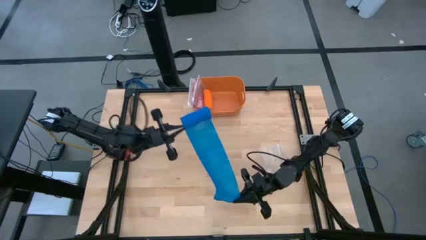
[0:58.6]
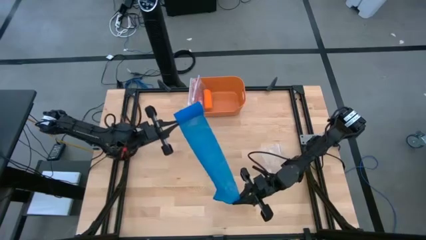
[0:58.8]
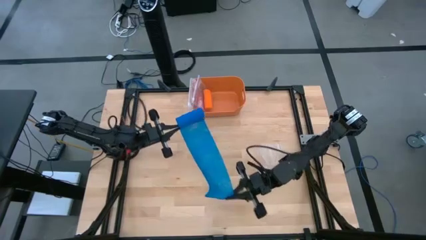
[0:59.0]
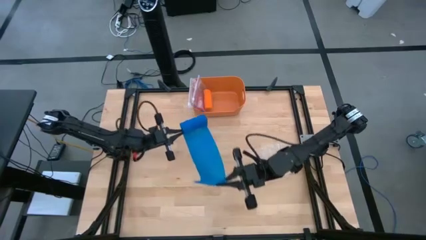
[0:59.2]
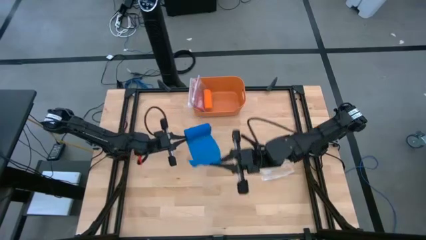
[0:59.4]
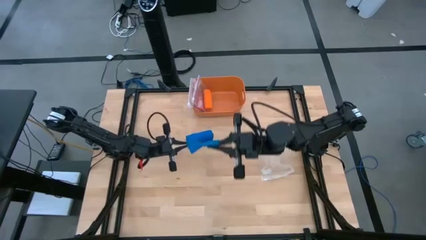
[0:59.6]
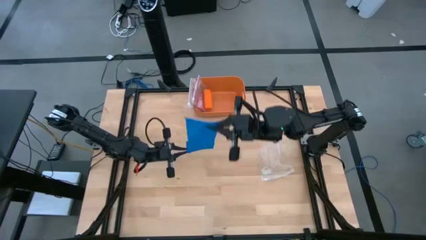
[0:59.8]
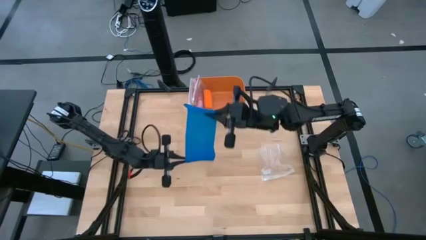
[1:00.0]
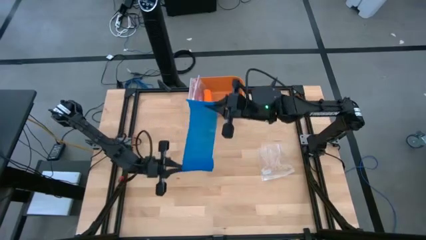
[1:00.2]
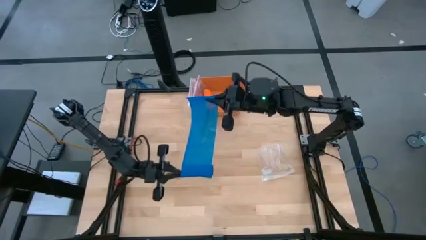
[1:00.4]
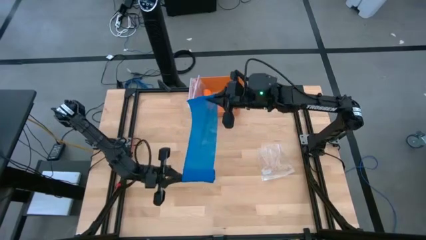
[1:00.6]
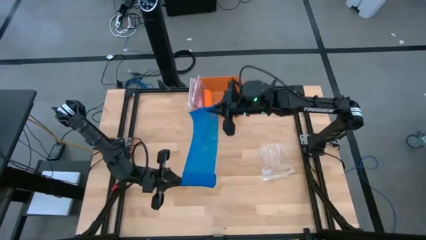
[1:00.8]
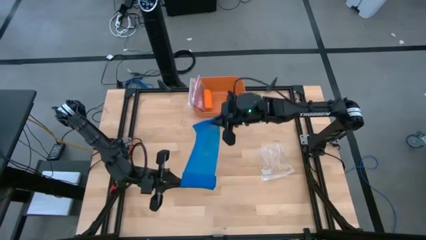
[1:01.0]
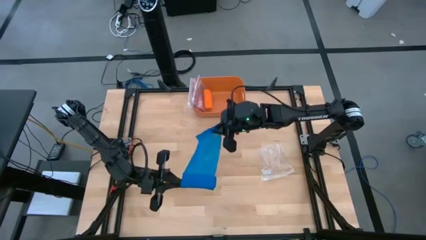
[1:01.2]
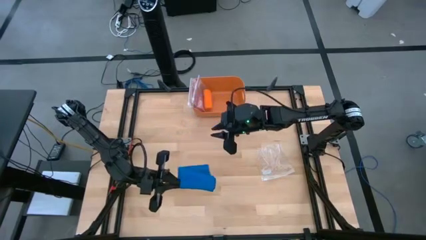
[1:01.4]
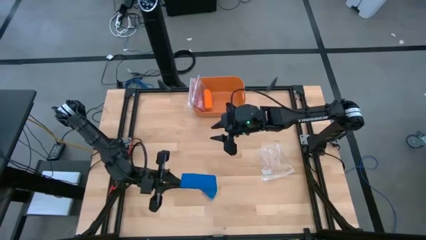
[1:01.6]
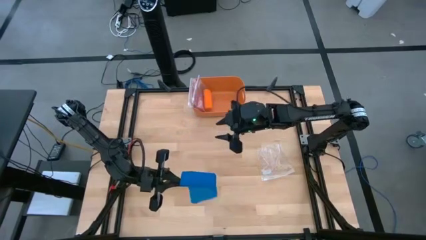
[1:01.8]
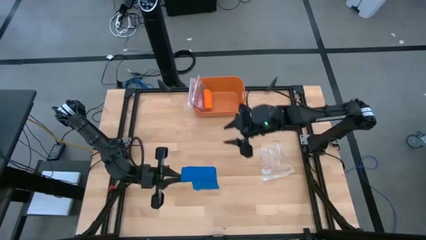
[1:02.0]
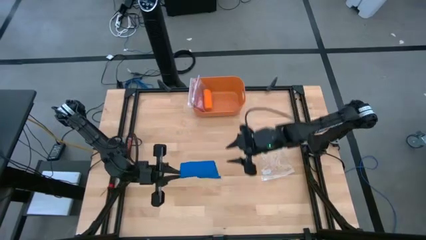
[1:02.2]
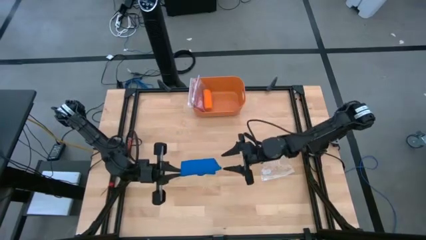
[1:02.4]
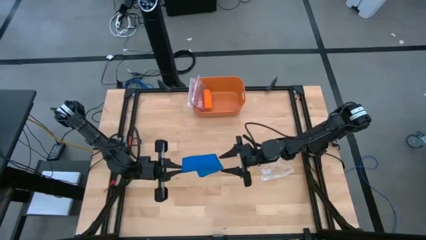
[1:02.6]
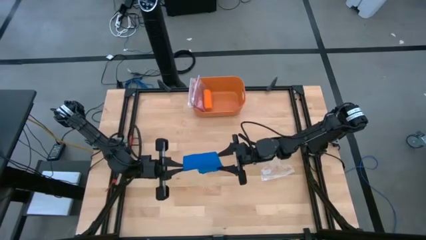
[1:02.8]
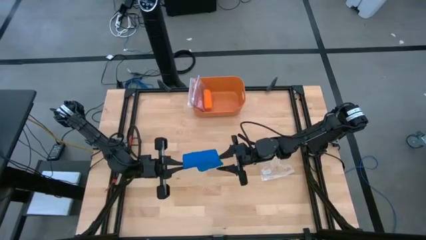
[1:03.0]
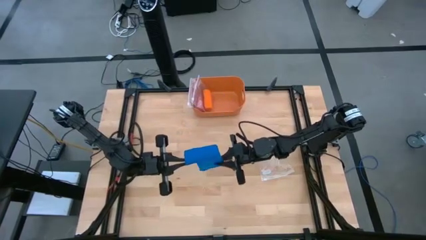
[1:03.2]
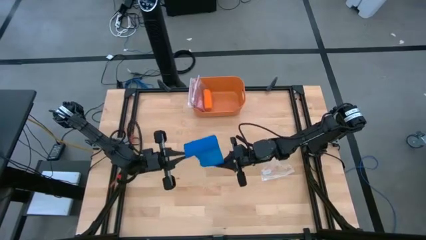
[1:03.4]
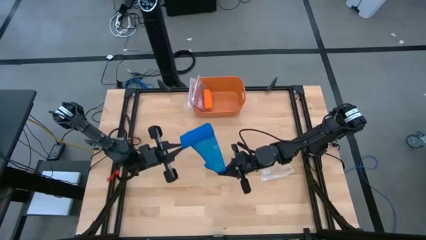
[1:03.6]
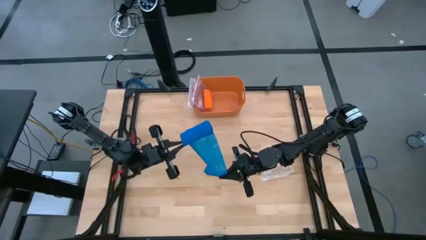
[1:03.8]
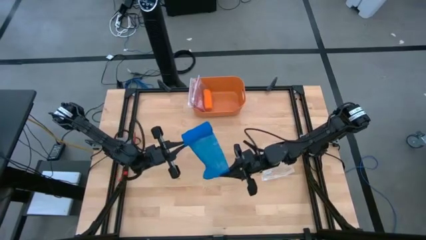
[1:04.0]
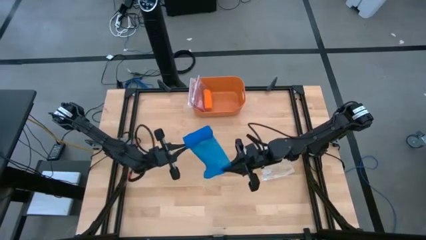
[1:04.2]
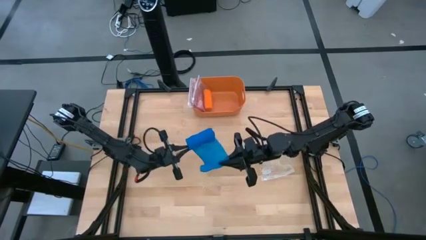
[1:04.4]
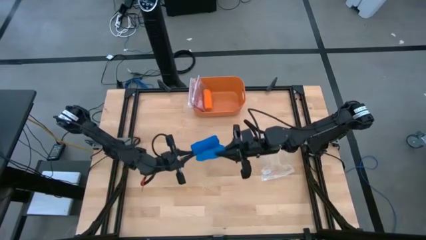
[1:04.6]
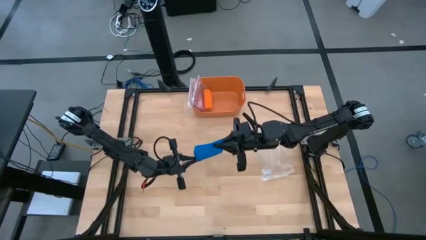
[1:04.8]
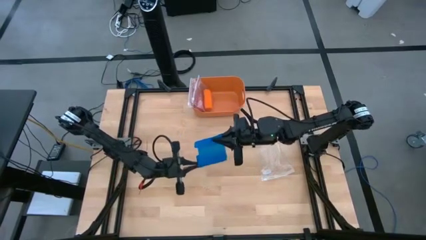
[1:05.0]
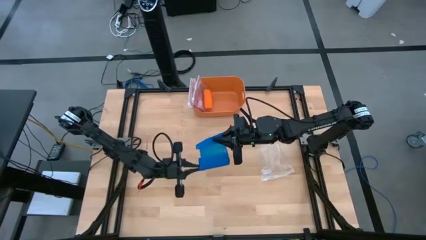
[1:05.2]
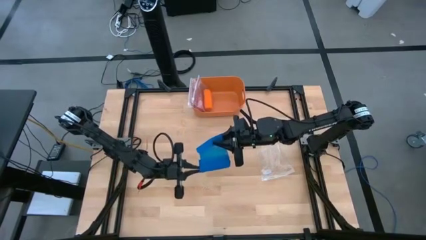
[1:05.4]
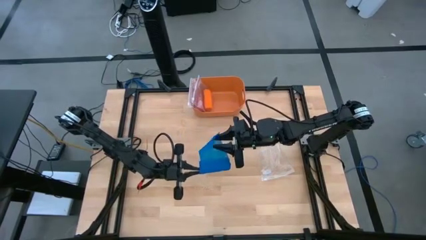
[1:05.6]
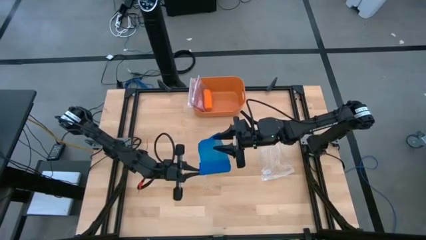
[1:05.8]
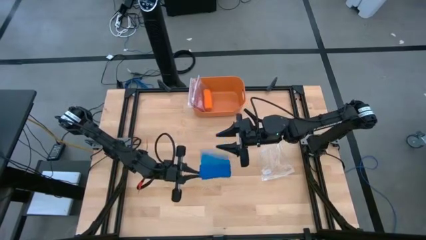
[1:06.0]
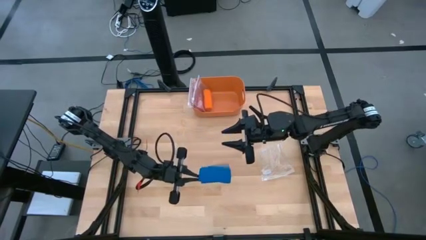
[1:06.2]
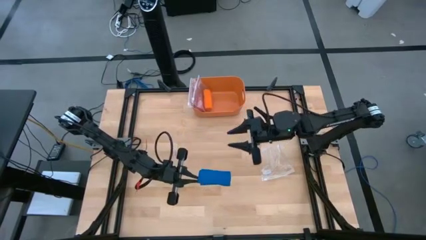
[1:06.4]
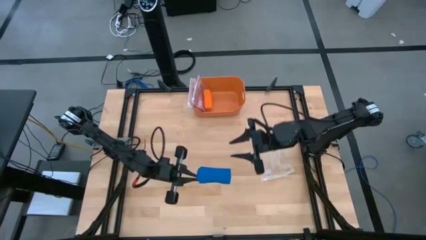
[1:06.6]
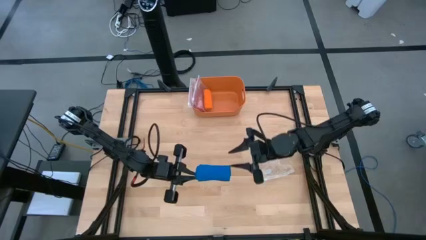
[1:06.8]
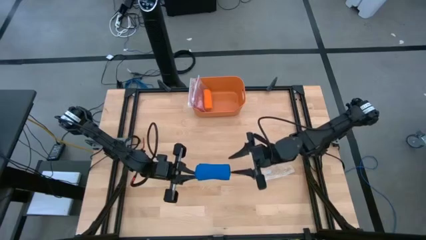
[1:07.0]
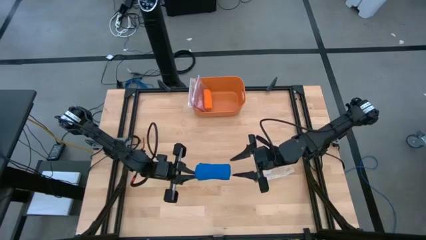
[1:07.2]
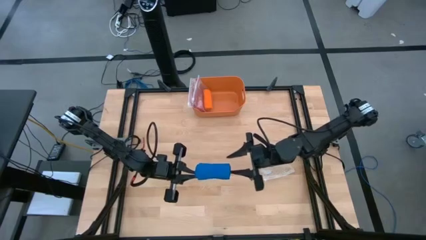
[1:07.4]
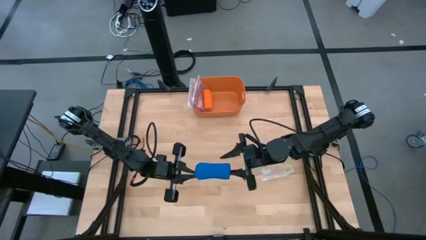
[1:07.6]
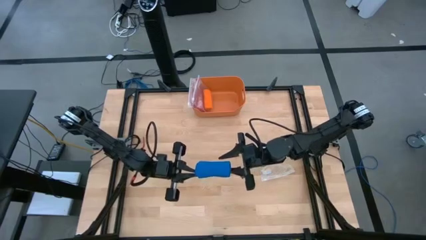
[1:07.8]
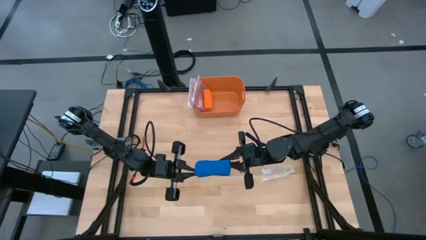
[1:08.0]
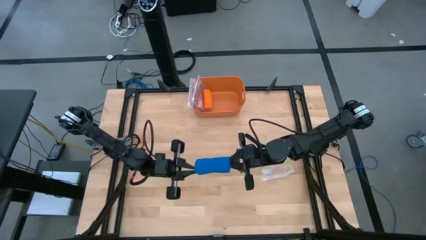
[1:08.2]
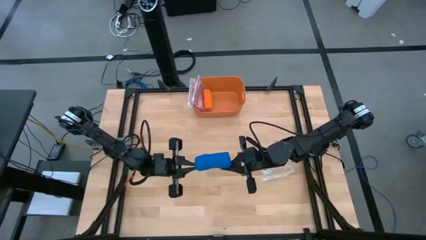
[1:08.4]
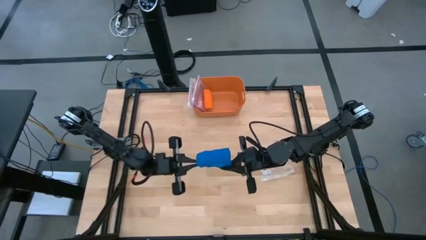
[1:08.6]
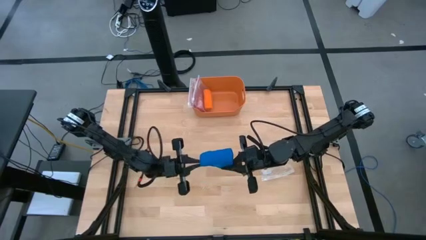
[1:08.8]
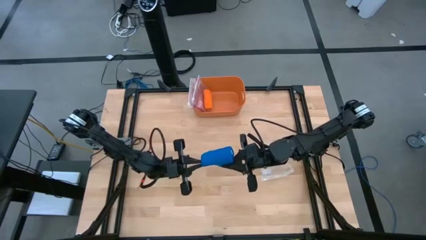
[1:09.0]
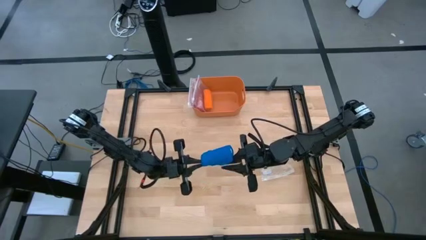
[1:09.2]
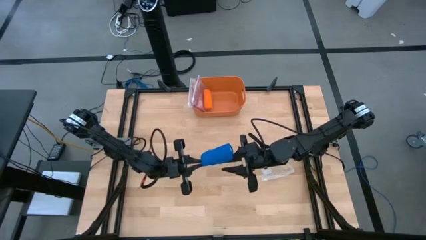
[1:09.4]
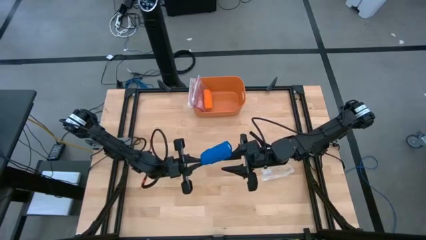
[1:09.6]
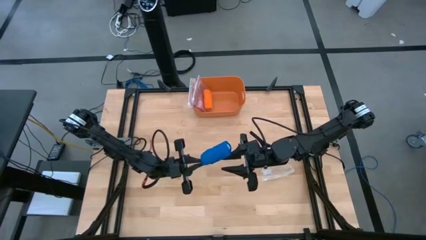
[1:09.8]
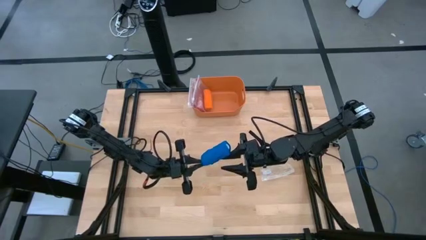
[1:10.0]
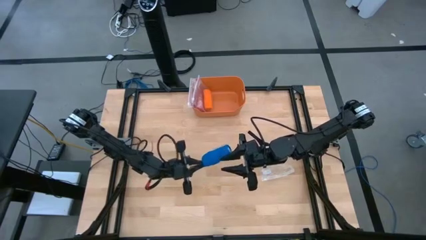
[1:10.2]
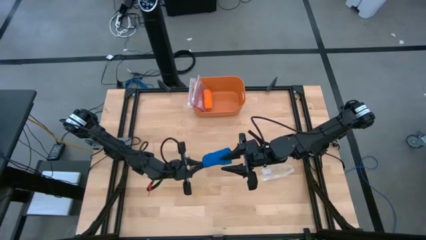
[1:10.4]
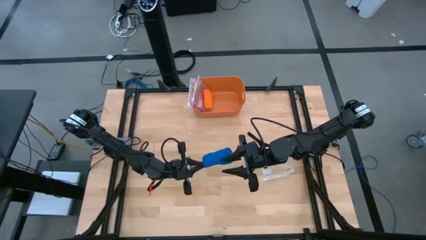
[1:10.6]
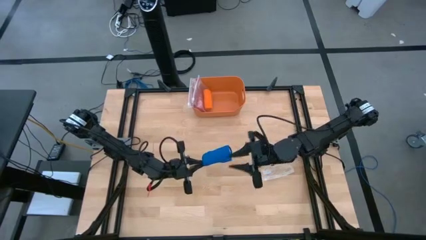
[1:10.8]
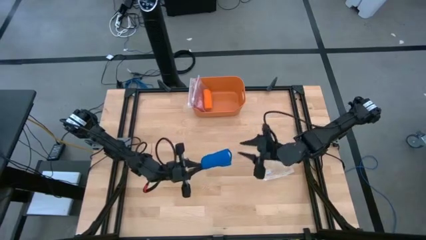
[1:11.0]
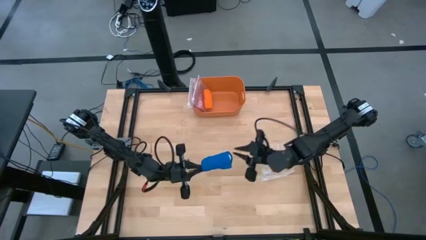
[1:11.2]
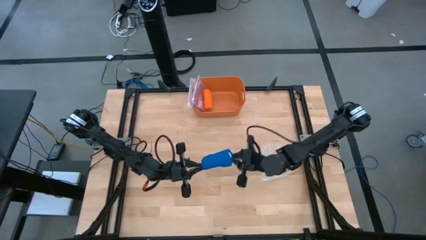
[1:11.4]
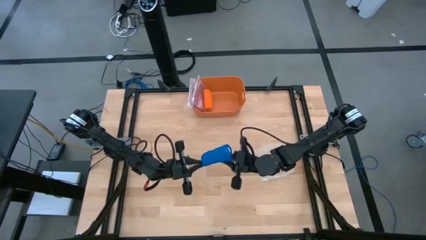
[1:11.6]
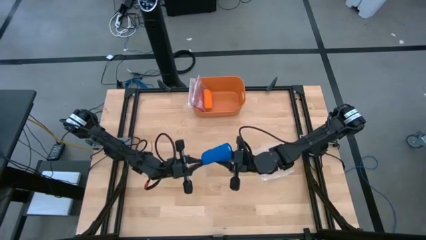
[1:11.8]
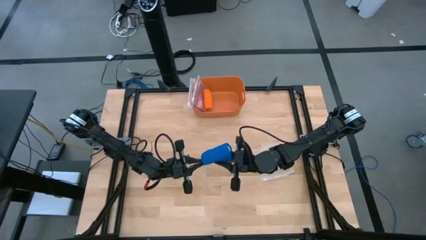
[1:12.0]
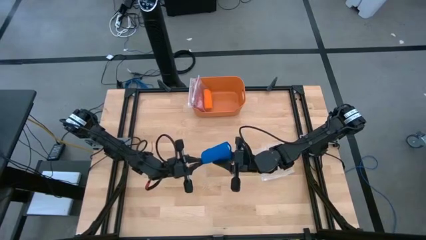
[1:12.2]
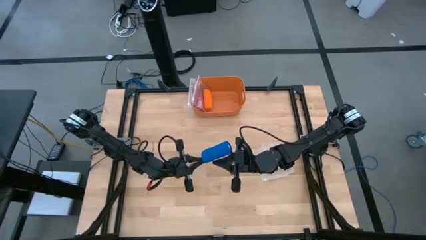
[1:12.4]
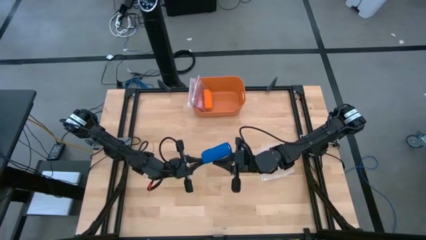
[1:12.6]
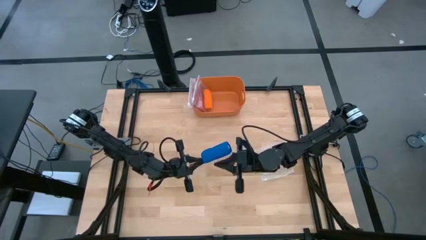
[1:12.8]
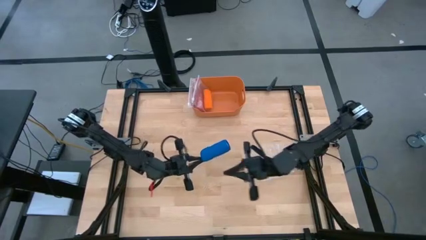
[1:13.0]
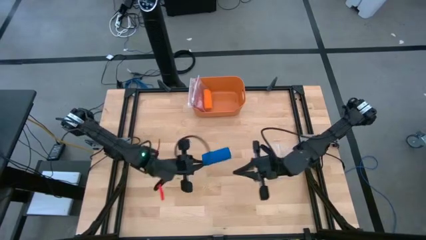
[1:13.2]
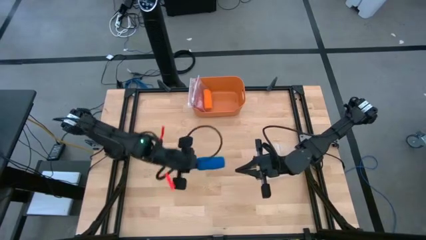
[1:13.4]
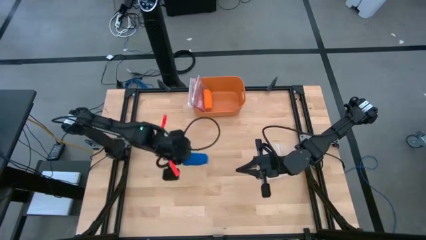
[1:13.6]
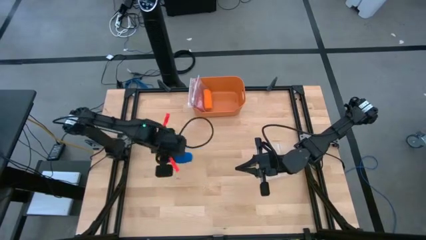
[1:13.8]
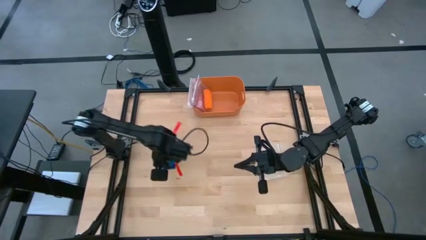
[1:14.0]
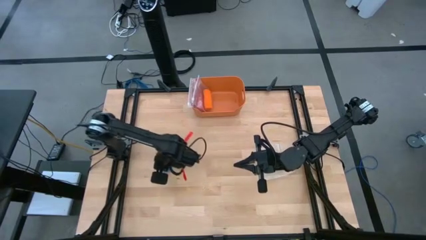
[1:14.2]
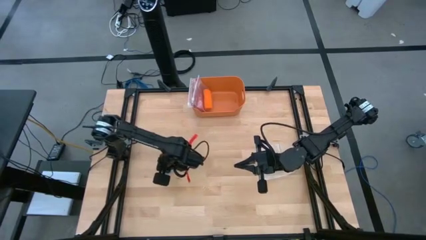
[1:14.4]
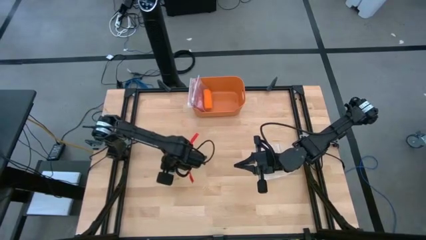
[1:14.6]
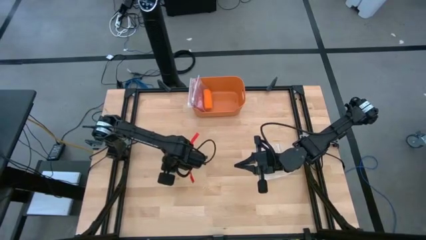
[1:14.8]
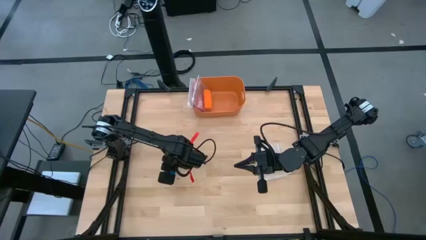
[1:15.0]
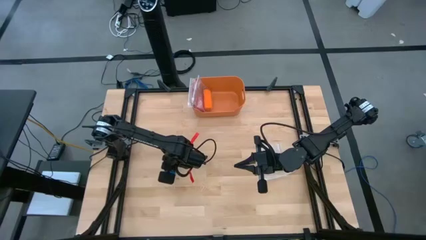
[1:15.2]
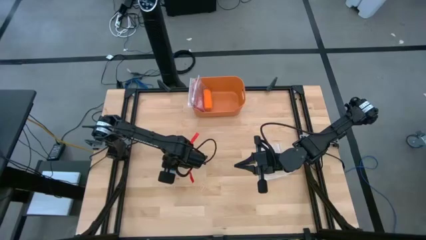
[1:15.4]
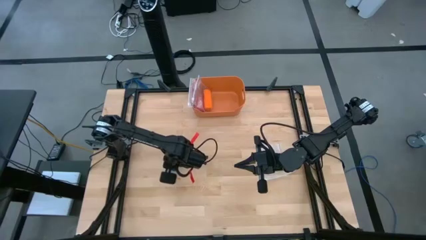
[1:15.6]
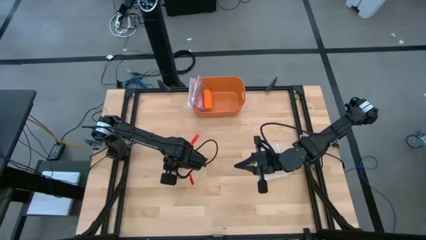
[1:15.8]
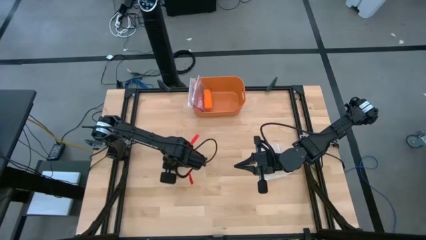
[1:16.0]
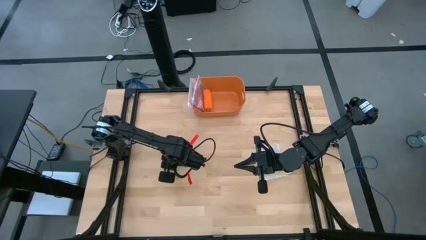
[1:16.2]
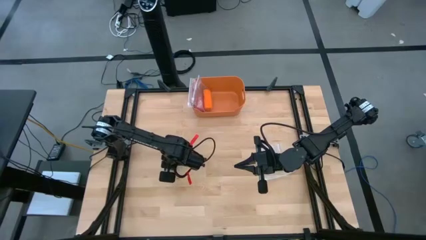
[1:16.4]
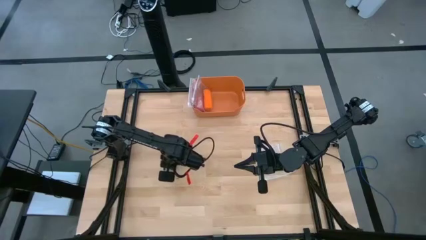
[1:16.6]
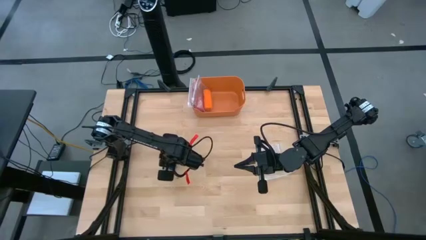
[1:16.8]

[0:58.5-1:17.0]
Task: Roll bandage
Roll the blue bandage
